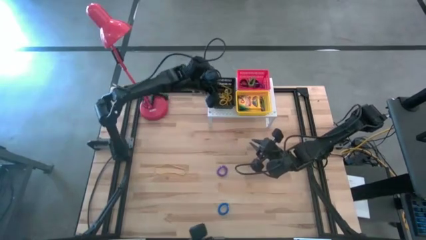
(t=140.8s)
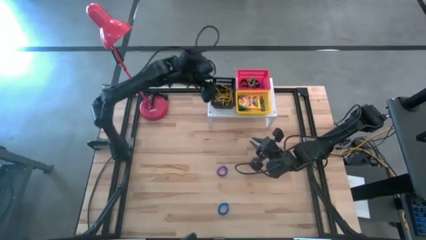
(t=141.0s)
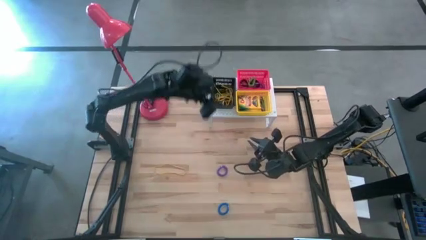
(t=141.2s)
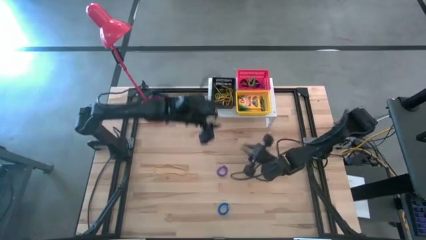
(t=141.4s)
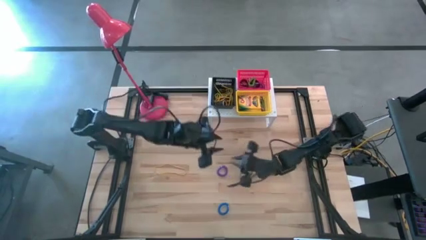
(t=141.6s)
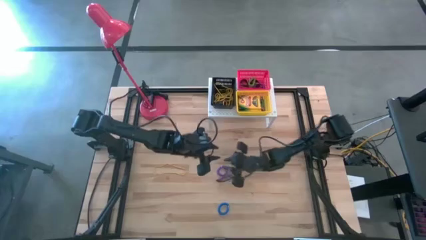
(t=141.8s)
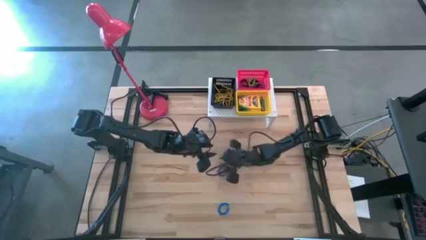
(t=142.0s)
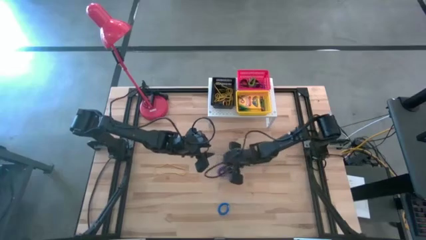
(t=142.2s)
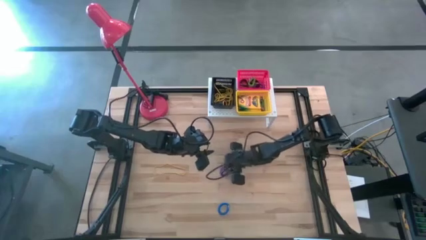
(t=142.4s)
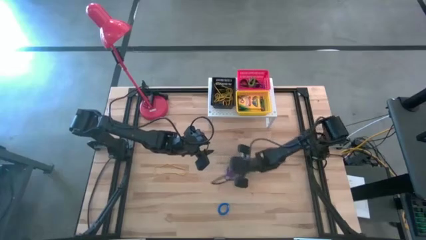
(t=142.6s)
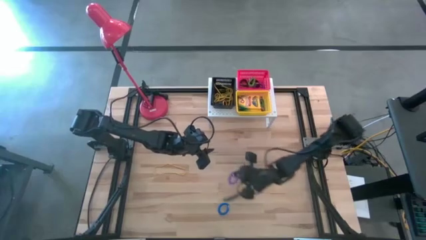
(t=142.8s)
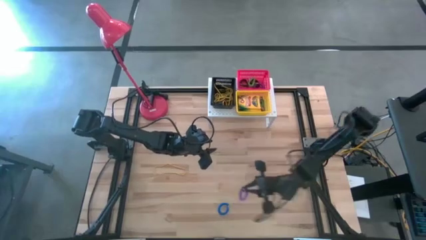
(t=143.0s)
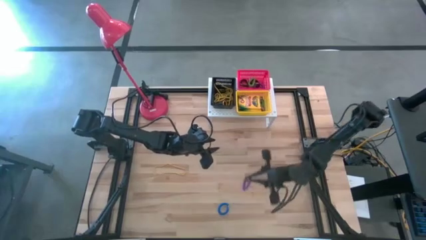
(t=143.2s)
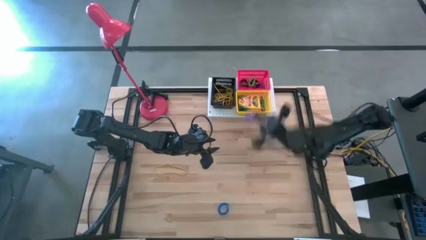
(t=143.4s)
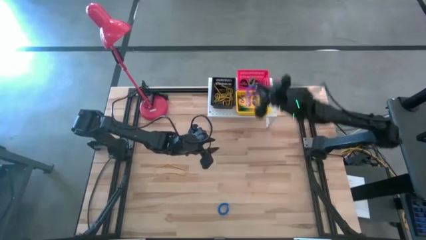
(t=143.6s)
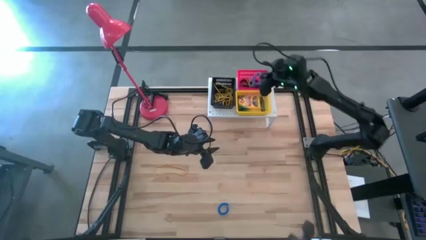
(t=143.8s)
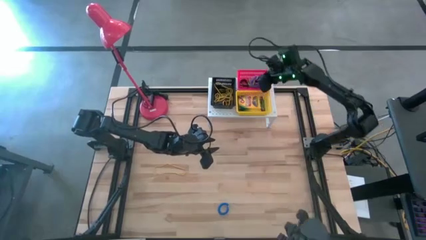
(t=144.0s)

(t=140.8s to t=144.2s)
Task: Pick & Place Office Desk Supplies
Put the violet spring keychain into the red bin on the shelf

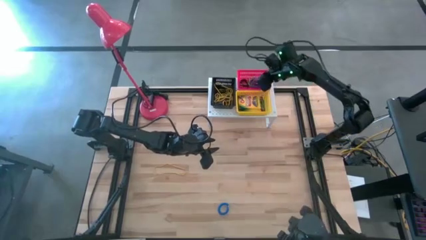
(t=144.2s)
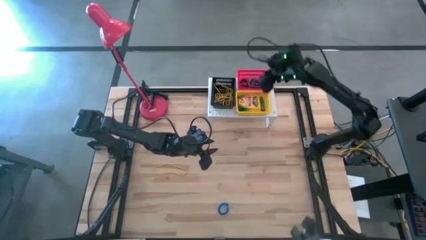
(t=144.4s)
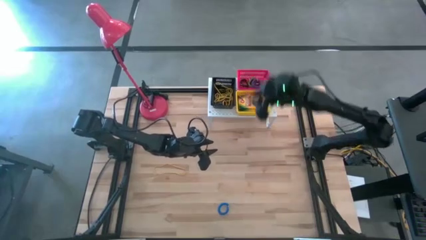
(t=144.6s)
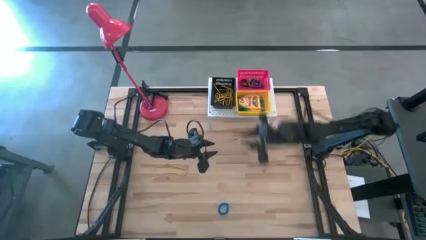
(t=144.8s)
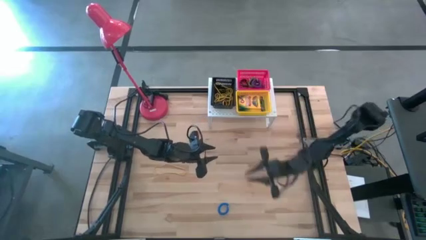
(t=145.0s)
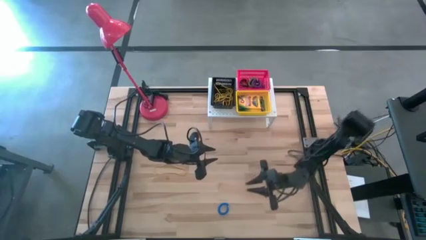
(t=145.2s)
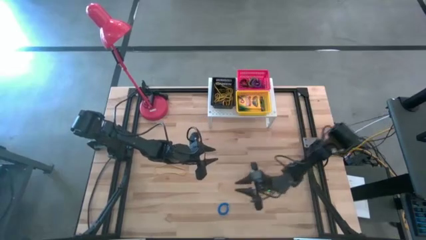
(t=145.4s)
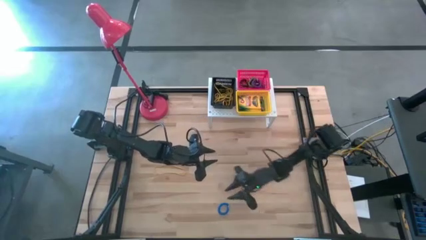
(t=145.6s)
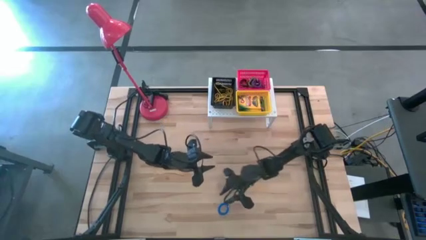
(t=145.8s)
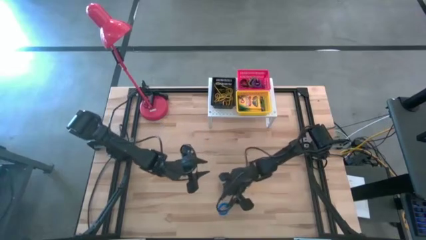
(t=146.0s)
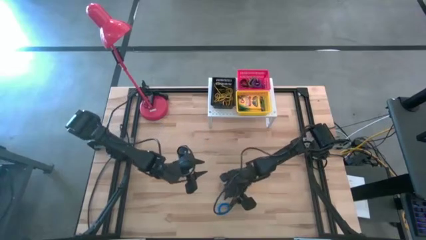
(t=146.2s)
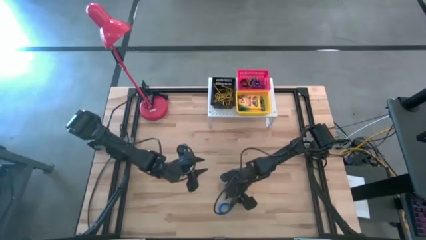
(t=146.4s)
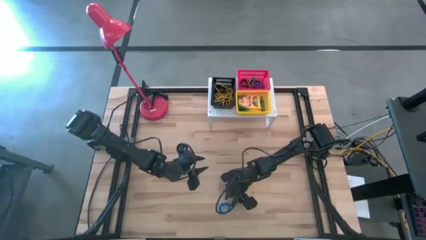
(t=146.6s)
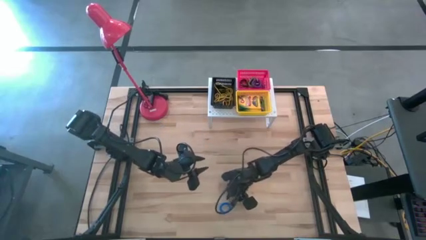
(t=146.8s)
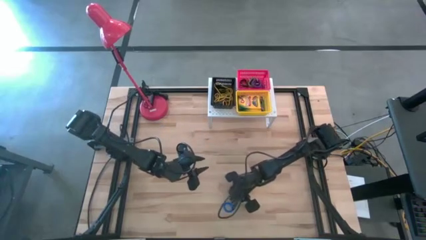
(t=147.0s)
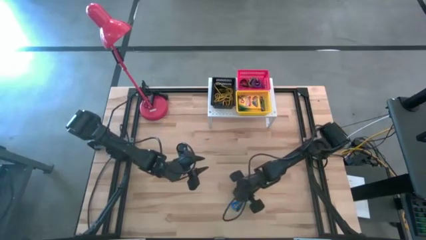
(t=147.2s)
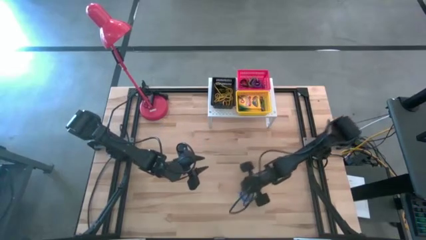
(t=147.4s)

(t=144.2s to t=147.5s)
Put the blue spring keychain into the red bin on the shelf

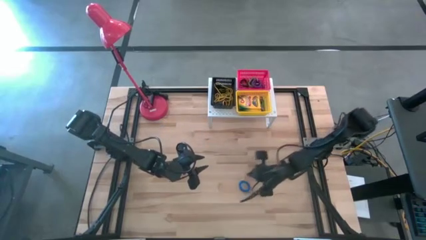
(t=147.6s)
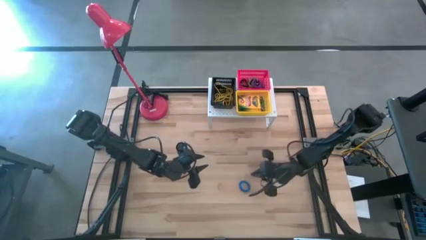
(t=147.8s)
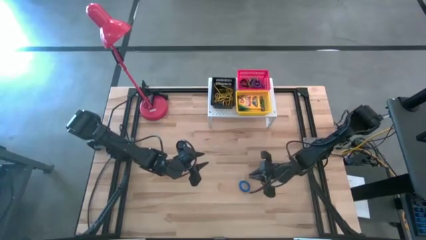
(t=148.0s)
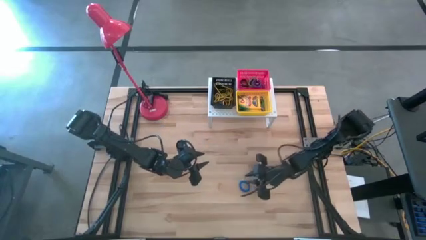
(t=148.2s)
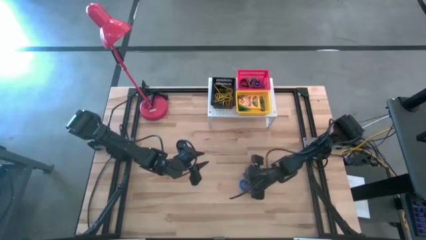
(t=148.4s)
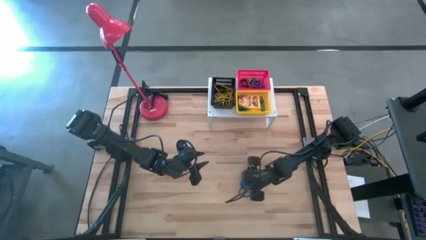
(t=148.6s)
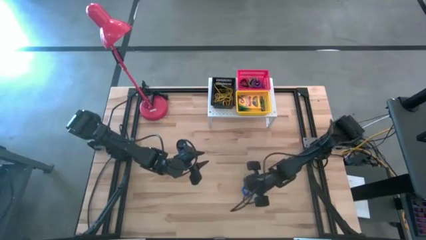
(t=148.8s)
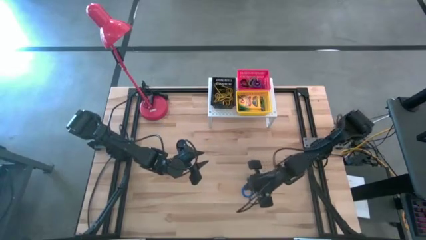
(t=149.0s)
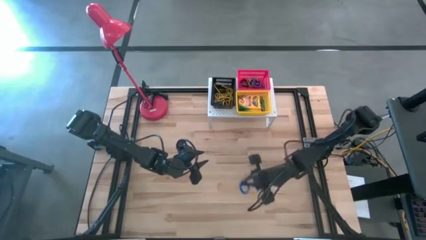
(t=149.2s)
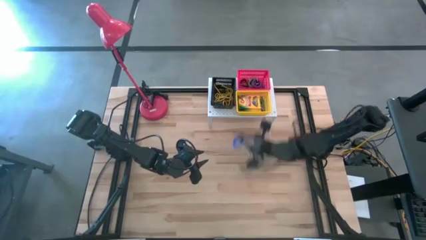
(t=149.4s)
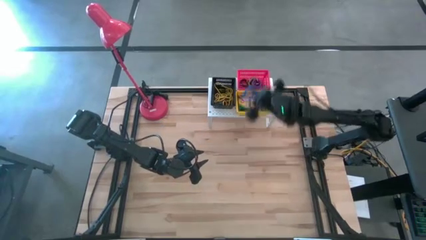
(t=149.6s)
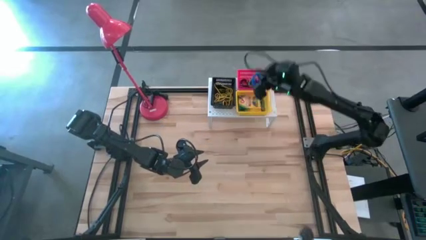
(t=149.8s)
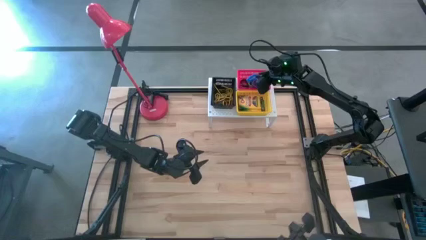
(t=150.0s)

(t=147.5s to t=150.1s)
Put the blue spring keychain into the red bin on the shelf

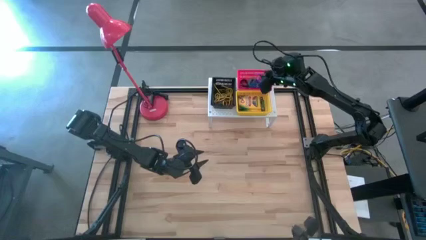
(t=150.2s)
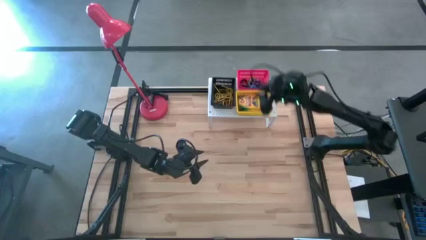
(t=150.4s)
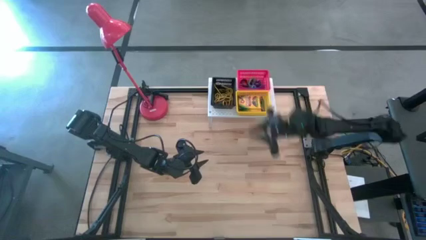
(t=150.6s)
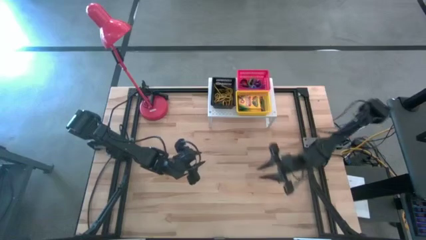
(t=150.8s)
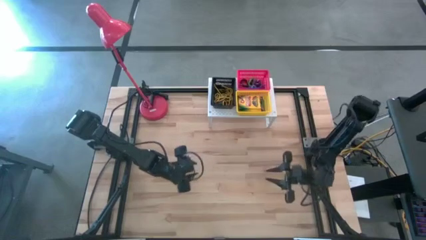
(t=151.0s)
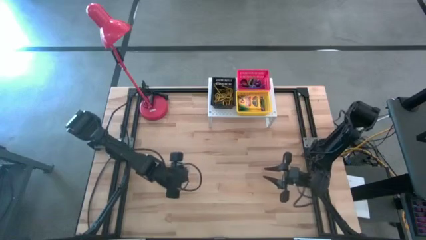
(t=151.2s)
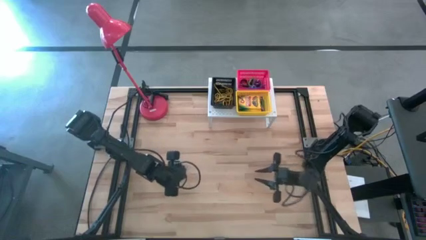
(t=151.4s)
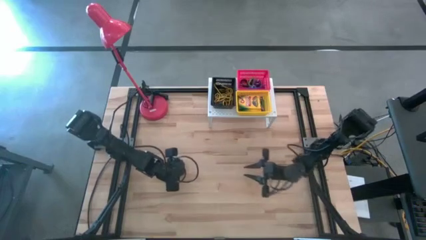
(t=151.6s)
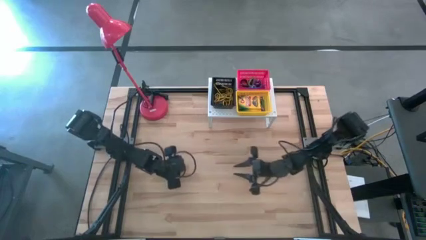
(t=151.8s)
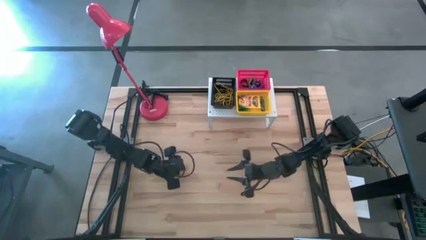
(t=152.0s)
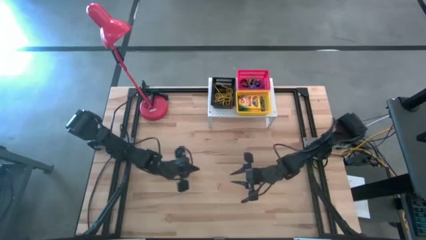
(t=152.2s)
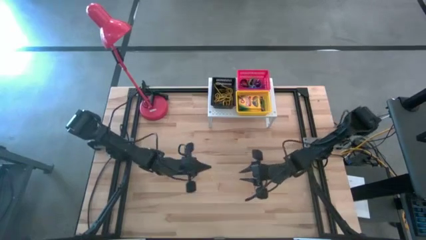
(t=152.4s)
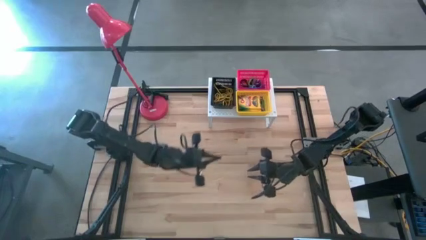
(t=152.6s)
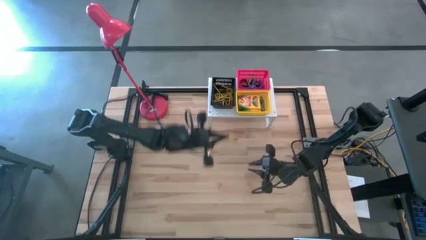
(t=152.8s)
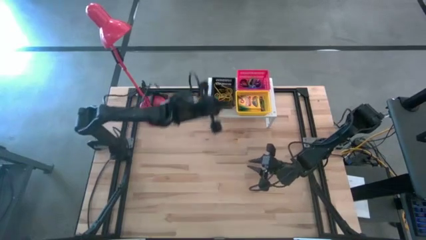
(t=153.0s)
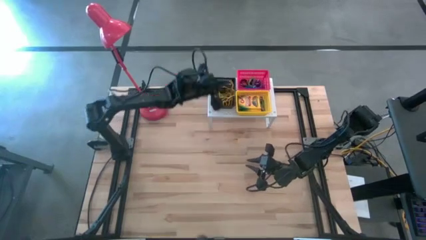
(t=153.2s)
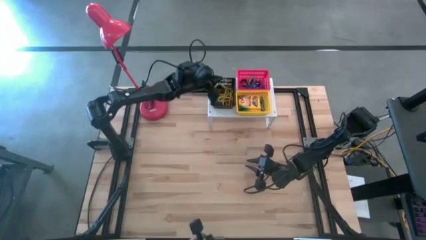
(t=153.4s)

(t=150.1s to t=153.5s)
Put the yellow rubber band into the black bin on the shelf

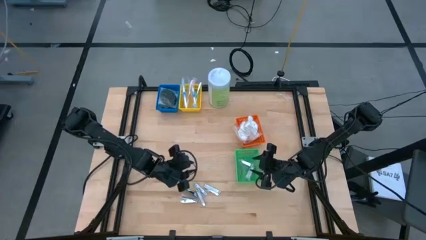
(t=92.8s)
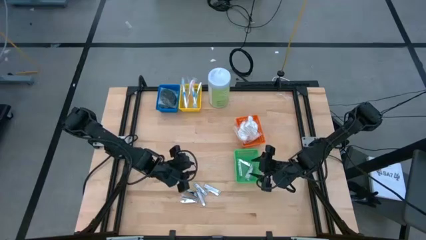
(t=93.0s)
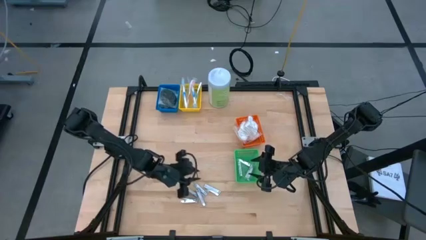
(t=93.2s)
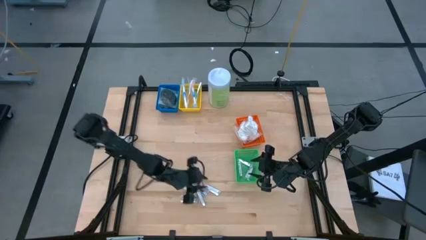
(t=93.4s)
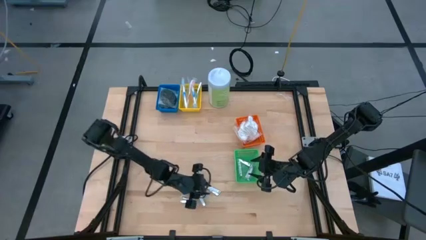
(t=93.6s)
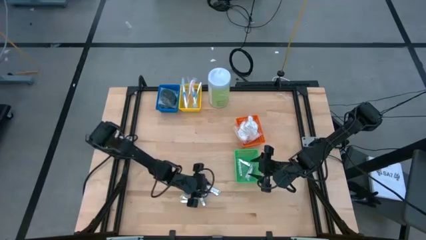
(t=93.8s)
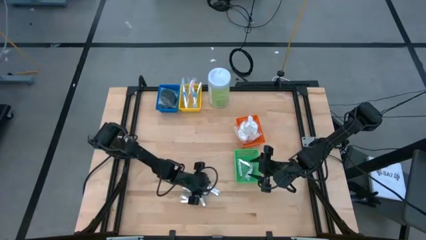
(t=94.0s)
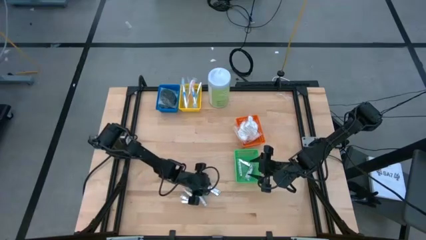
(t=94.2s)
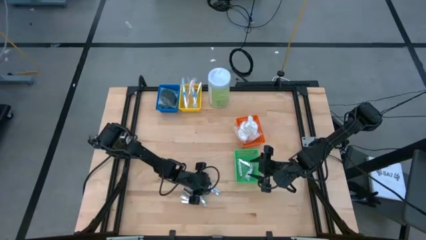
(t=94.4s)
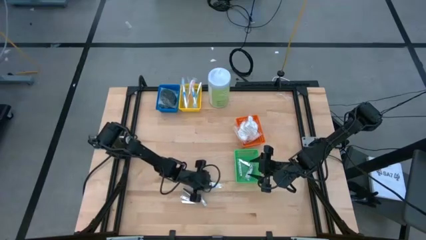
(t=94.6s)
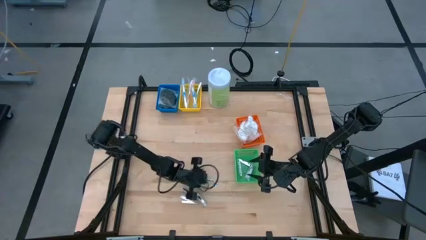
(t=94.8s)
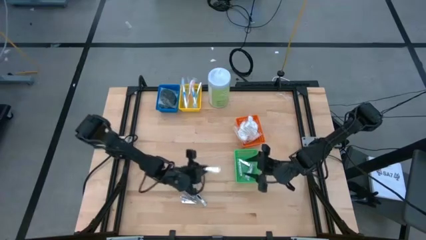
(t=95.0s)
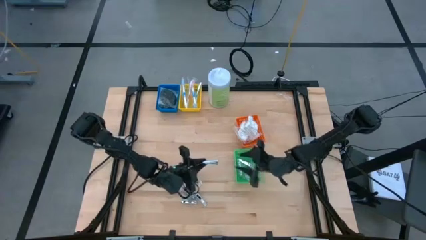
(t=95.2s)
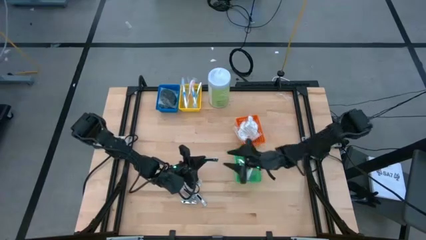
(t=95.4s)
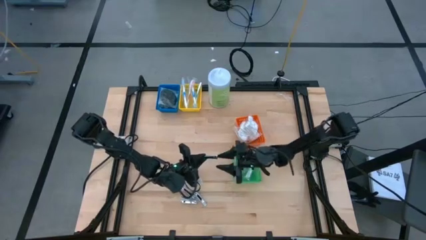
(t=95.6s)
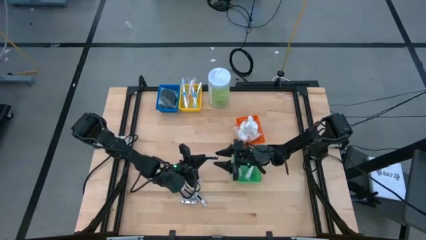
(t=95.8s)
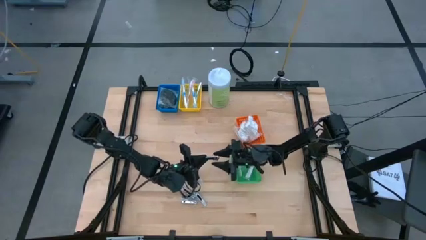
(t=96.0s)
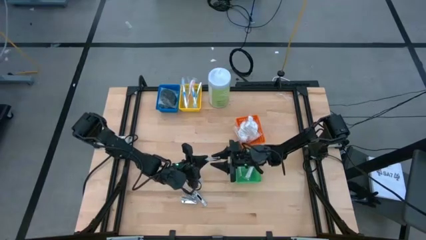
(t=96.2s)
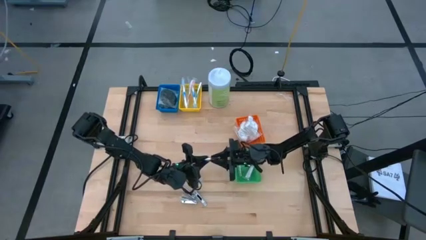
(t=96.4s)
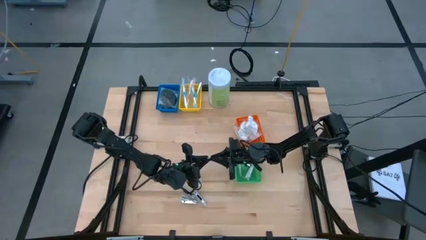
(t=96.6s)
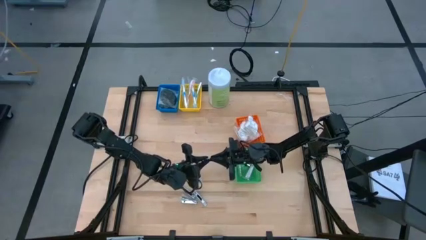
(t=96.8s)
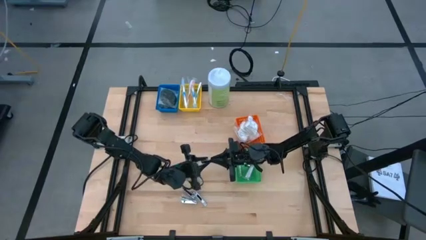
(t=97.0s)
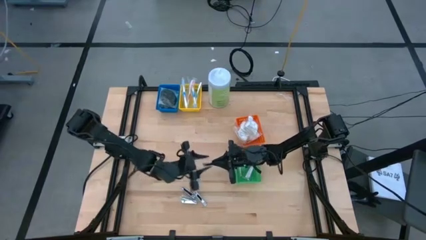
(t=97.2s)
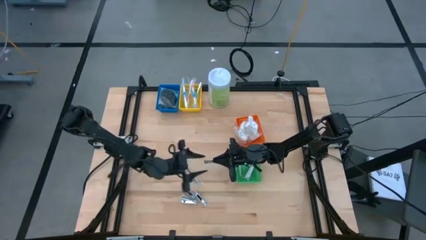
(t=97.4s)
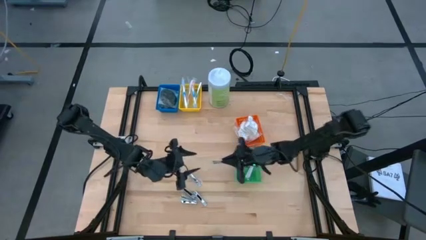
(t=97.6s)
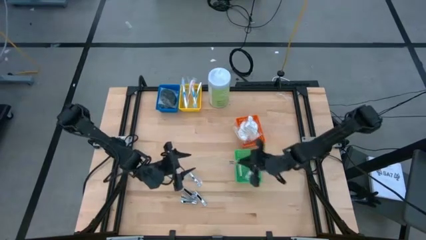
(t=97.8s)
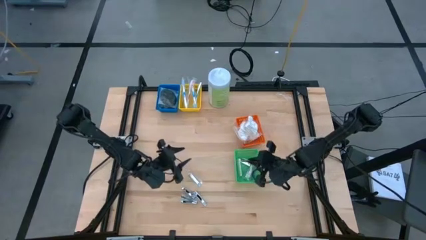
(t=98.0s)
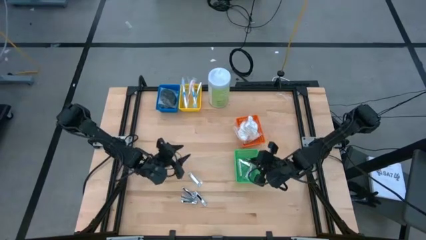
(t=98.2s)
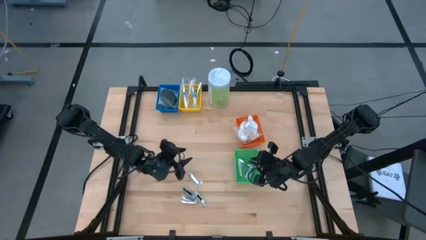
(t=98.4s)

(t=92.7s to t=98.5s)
Task: Pick & Place Travel size toiletries
Put the nail cutter into the green bin
